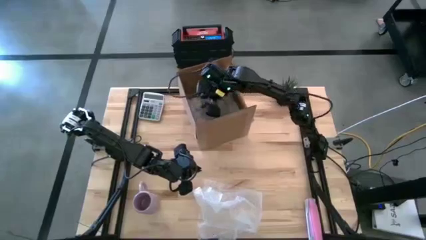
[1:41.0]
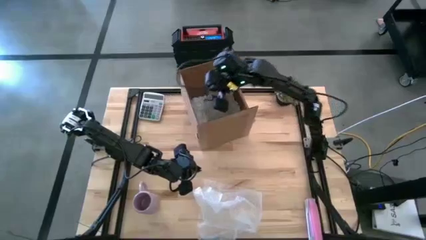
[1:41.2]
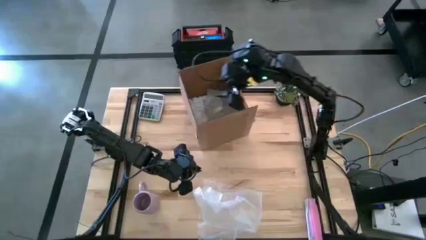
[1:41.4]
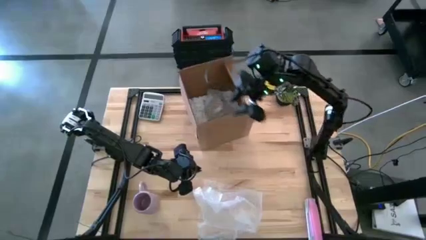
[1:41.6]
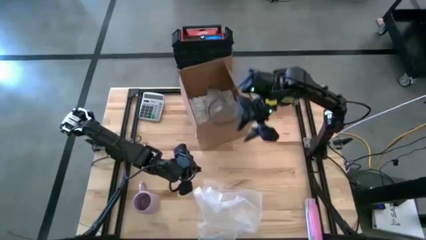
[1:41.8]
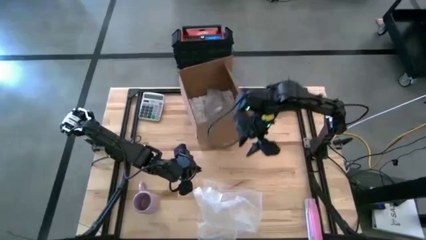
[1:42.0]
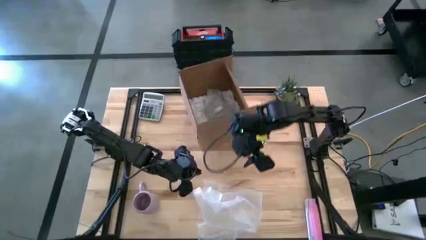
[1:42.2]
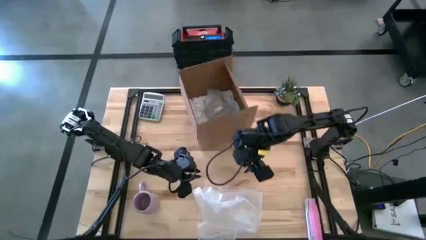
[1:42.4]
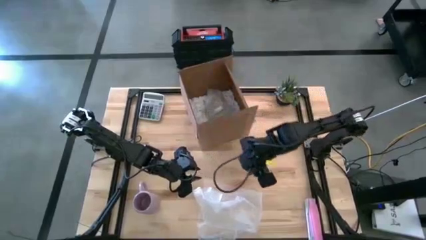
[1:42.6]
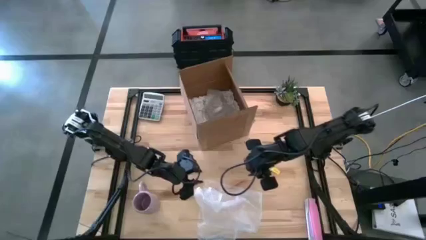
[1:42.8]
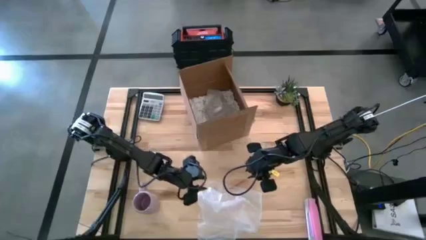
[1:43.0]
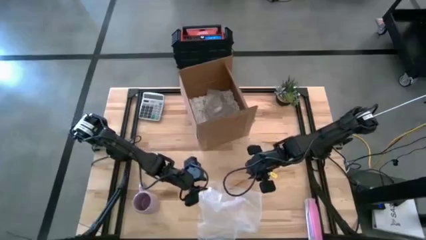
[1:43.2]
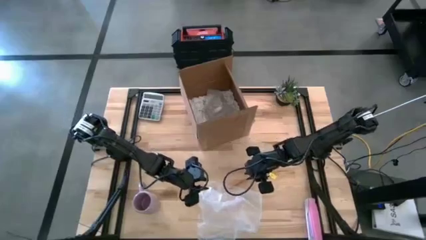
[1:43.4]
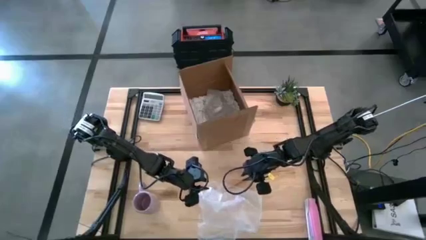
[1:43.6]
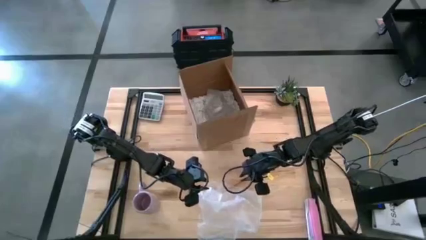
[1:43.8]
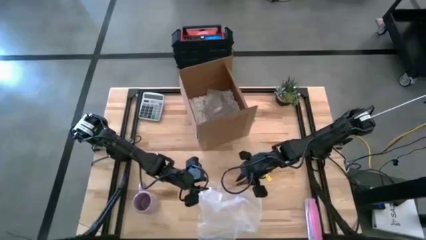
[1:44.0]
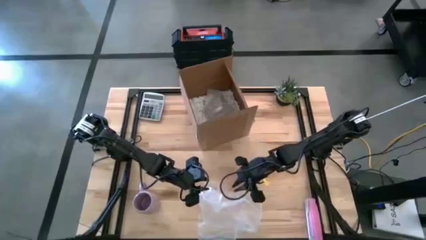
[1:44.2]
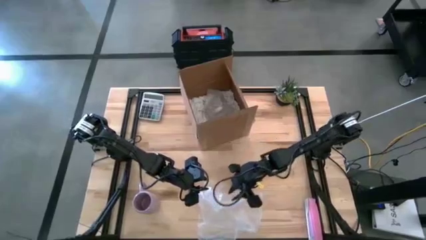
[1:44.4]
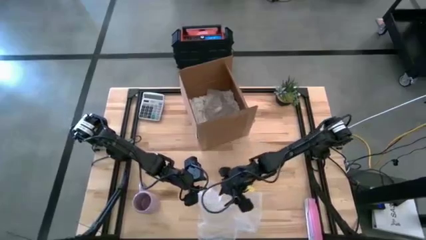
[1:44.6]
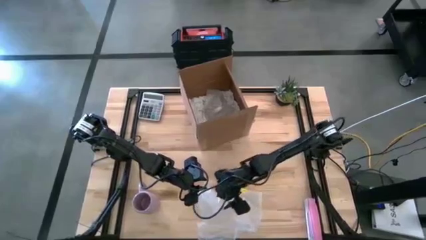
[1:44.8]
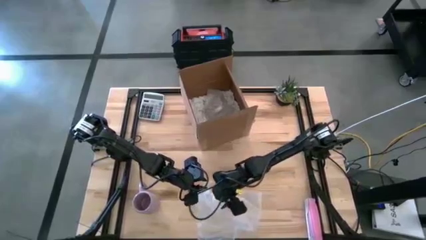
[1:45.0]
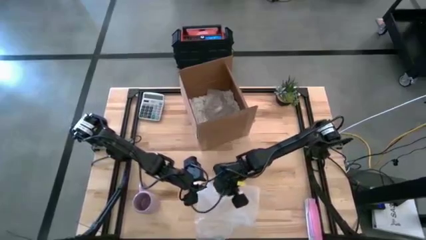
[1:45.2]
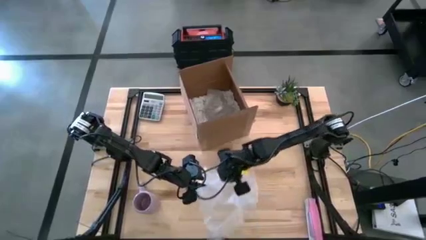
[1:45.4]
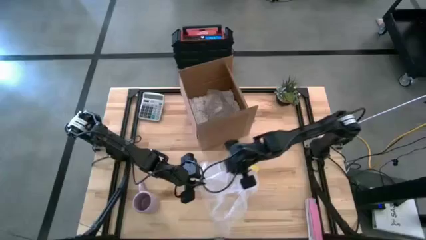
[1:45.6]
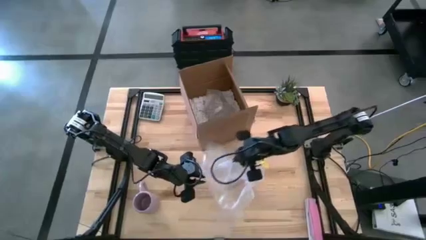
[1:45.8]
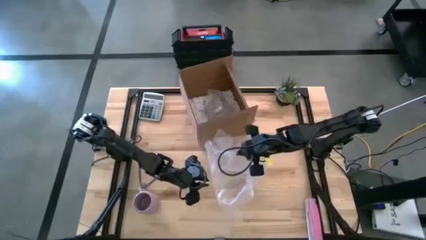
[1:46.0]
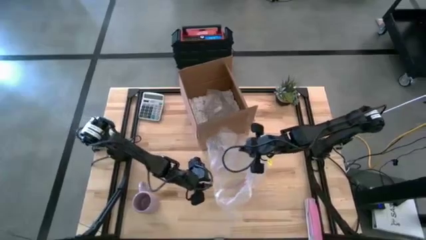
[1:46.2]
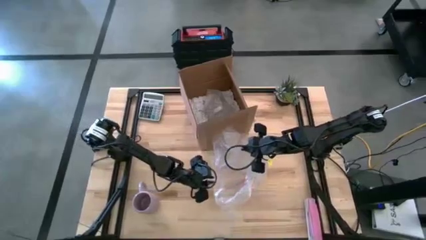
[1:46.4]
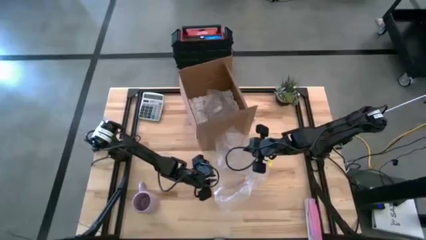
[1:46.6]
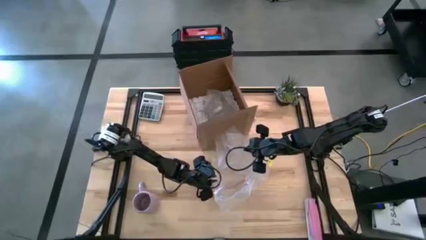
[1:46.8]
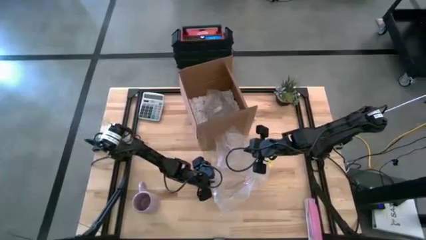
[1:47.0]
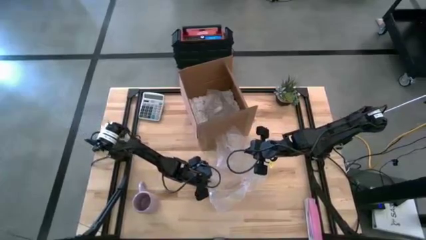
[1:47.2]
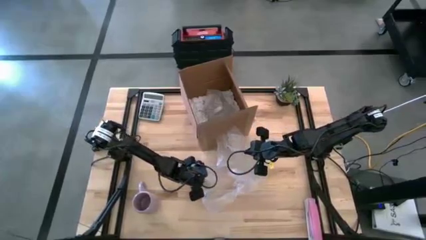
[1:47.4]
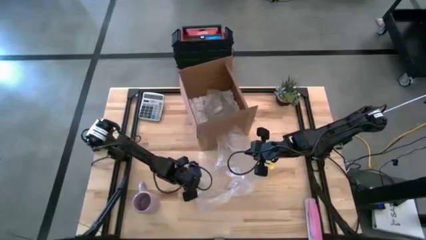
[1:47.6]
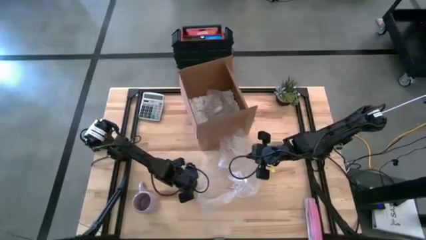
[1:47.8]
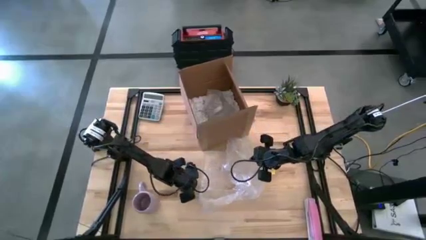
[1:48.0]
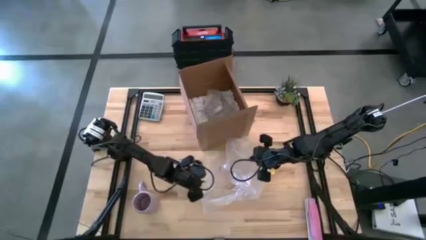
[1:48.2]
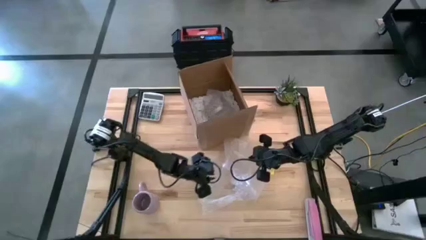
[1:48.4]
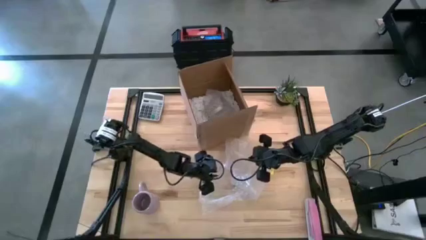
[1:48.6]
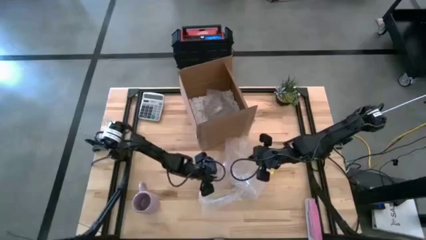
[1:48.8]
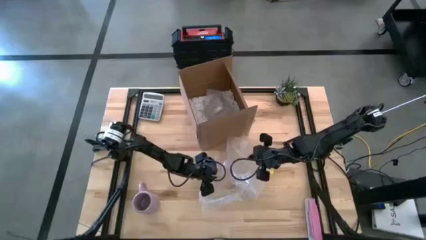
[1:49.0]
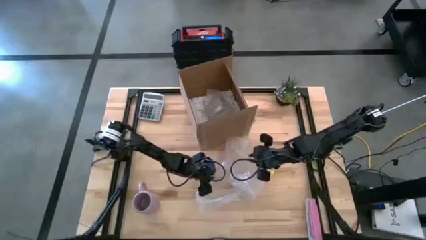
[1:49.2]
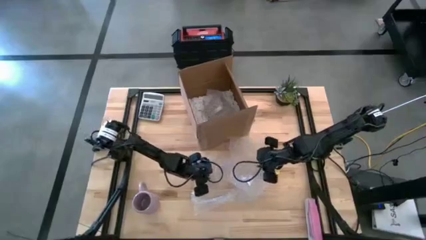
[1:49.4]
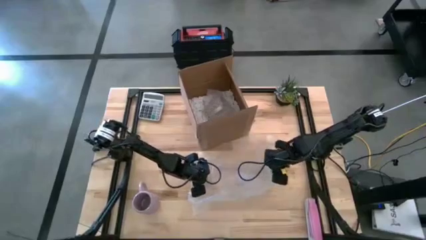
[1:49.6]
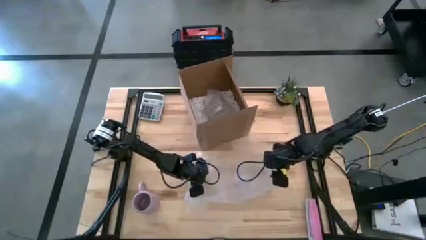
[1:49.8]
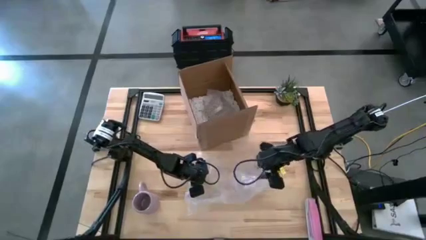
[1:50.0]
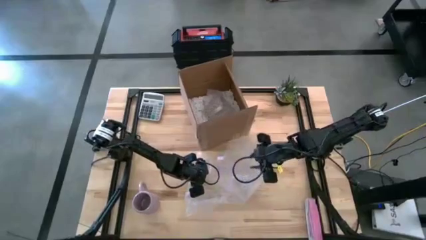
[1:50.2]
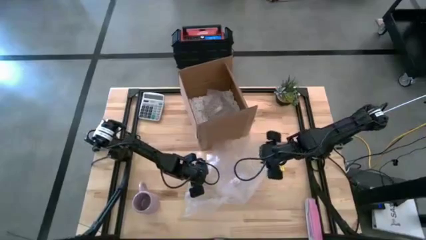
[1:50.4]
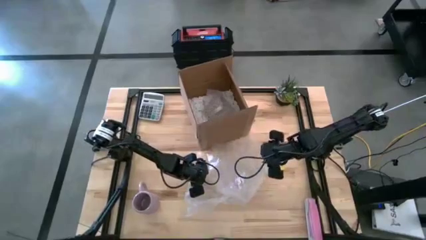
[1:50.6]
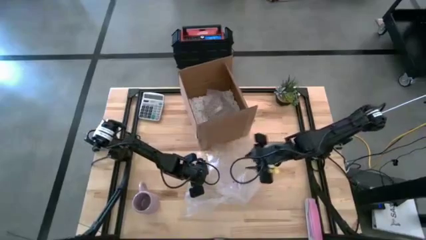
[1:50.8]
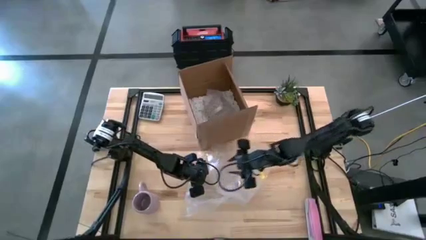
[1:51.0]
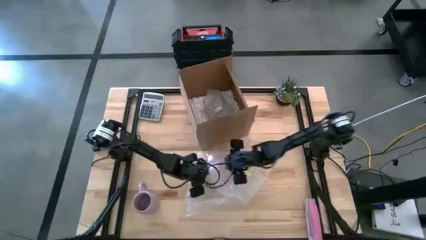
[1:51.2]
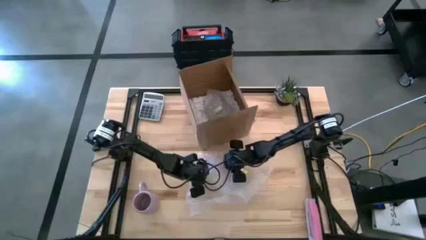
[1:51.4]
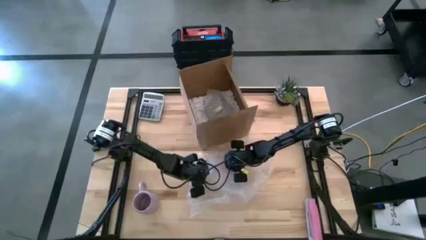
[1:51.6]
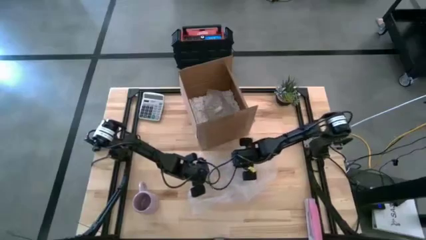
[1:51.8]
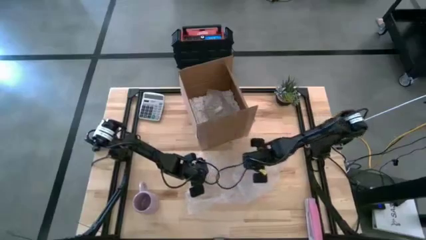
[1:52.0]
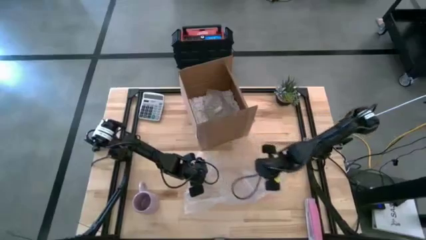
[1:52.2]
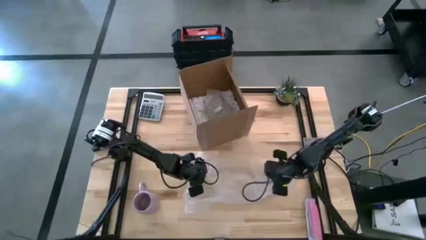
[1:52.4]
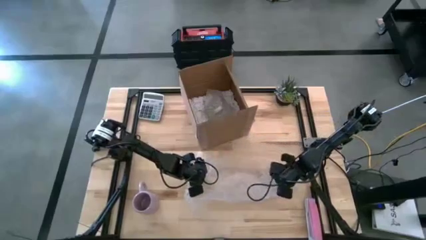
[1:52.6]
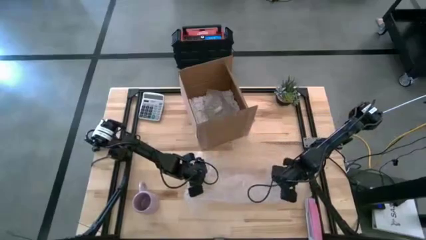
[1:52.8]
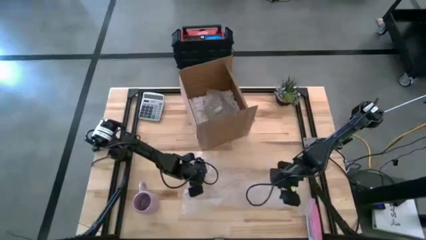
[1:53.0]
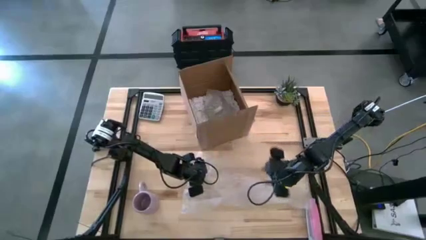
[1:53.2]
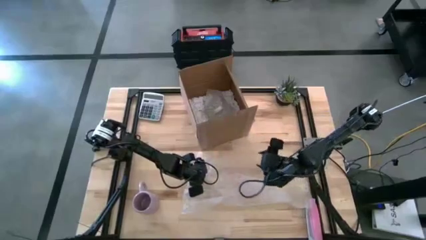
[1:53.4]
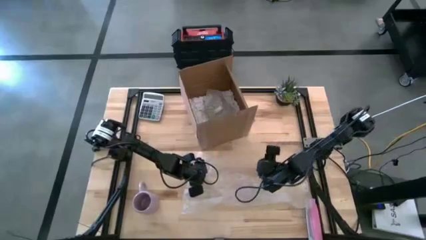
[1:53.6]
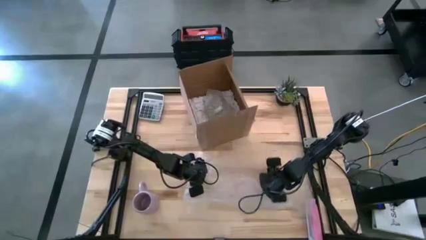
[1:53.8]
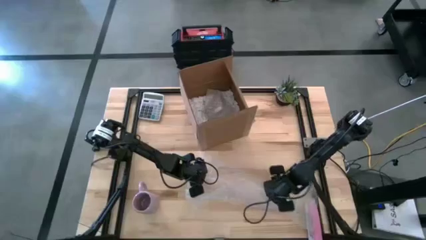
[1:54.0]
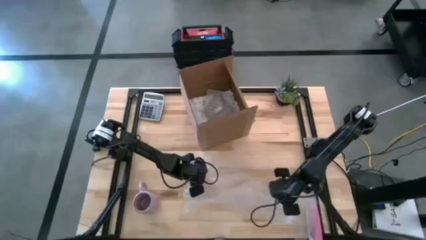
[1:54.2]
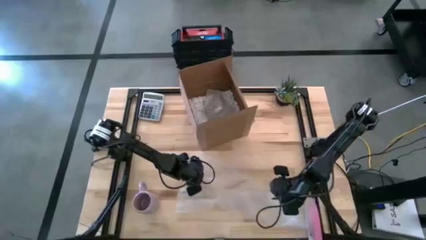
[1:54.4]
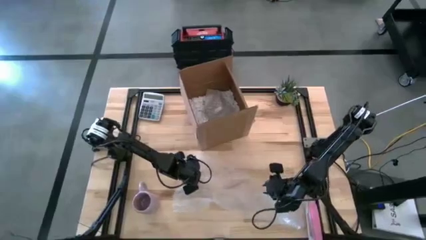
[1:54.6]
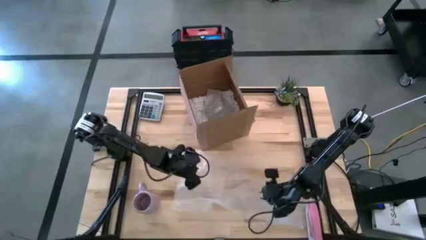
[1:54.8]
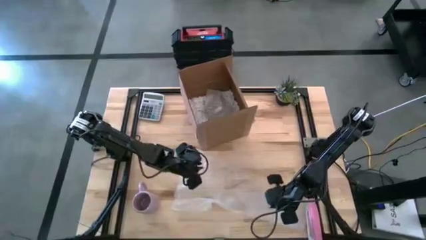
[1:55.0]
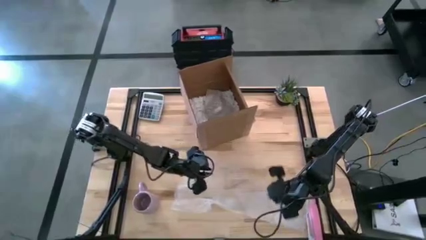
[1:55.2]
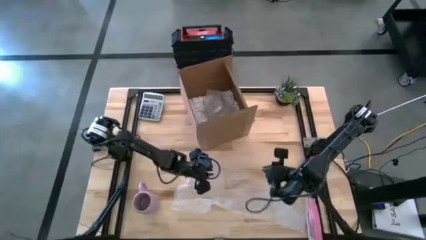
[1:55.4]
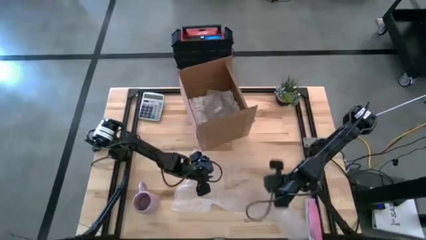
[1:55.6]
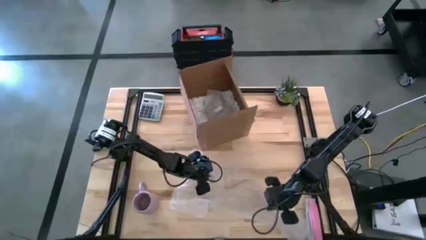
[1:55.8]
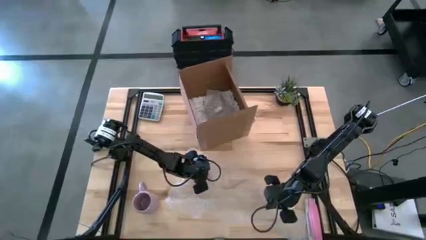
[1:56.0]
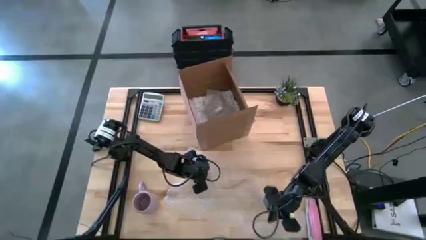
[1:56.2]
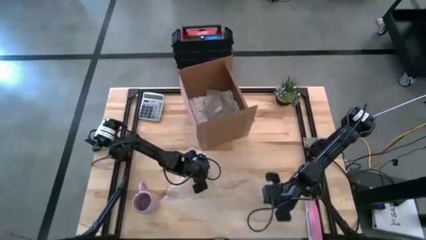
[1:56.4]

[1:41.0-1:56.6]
Task: wrap mug
Wrap the purple mug with the bubble wrap
